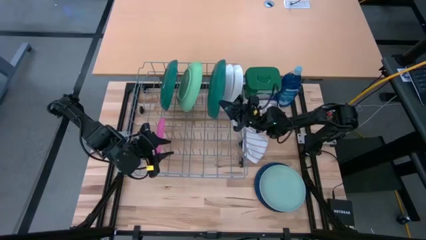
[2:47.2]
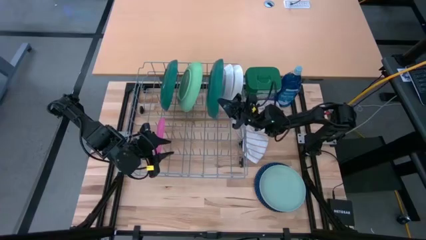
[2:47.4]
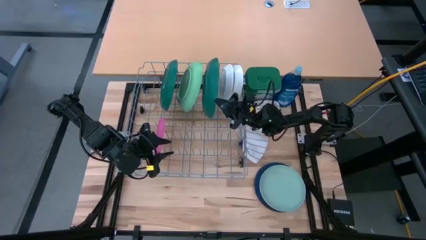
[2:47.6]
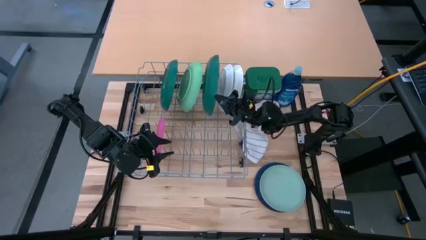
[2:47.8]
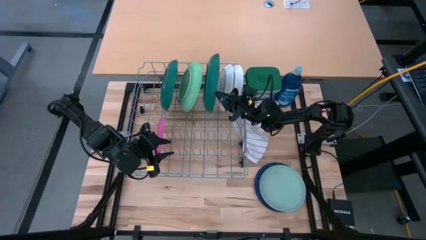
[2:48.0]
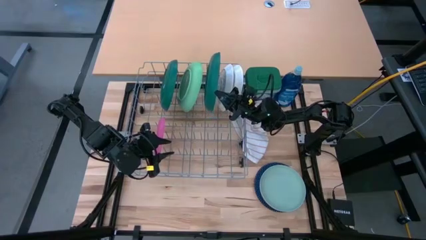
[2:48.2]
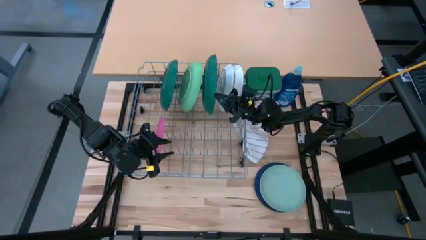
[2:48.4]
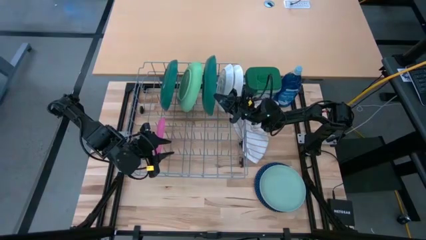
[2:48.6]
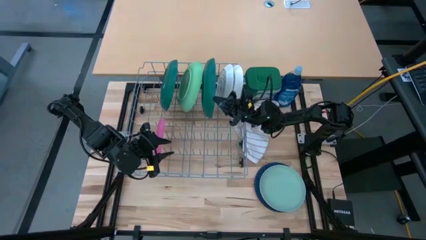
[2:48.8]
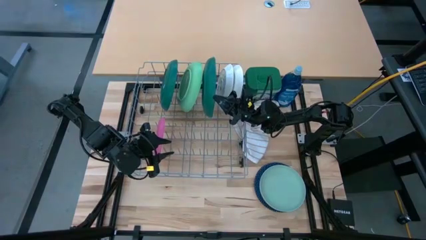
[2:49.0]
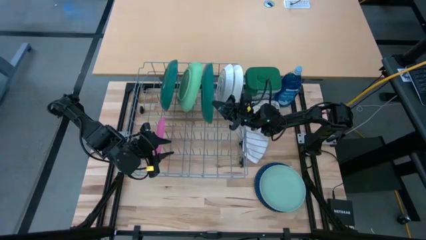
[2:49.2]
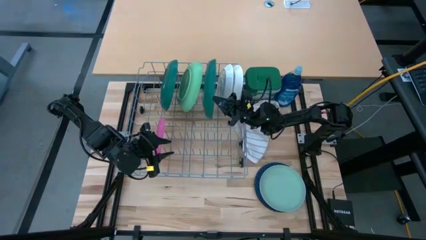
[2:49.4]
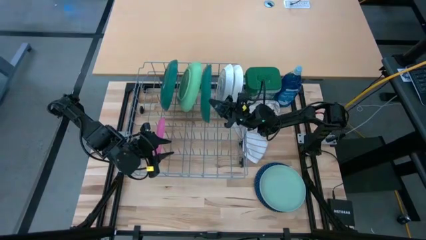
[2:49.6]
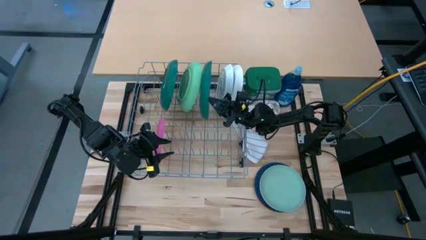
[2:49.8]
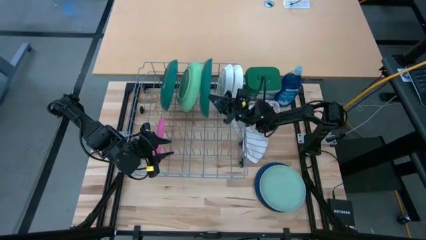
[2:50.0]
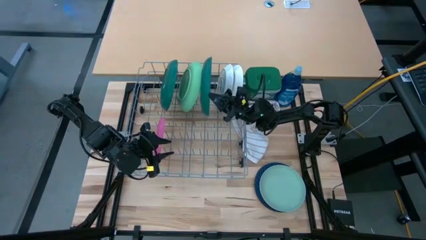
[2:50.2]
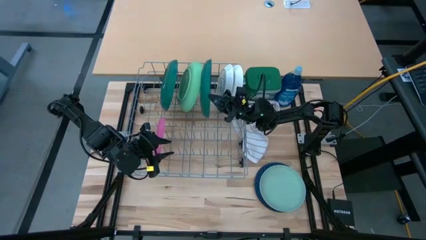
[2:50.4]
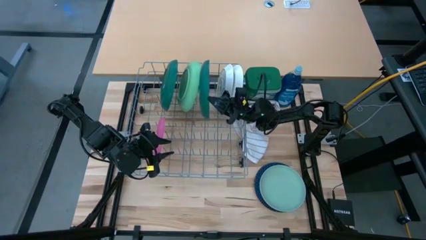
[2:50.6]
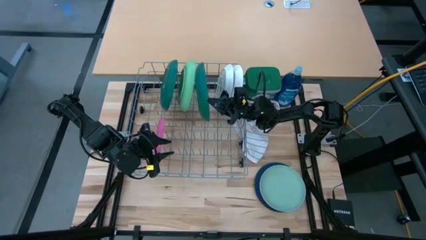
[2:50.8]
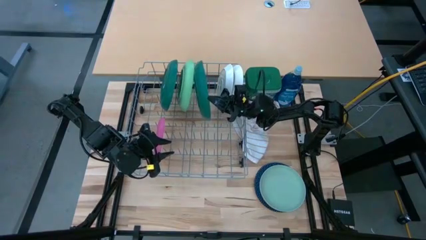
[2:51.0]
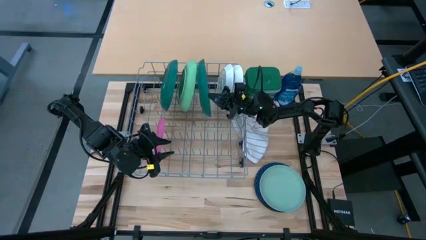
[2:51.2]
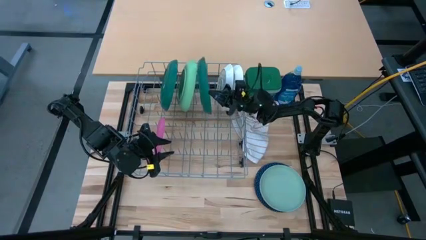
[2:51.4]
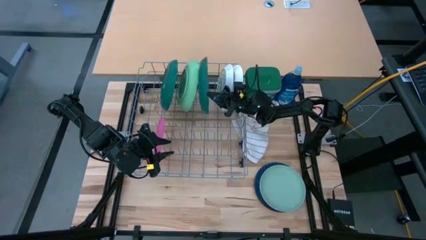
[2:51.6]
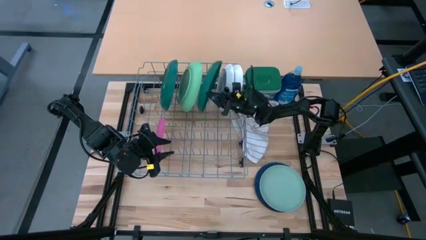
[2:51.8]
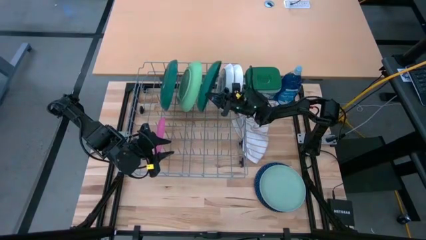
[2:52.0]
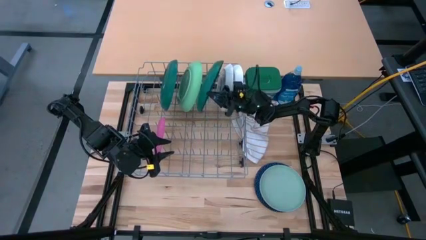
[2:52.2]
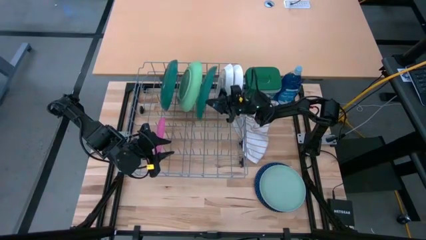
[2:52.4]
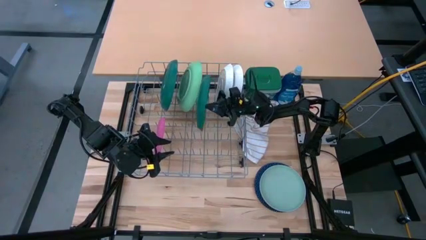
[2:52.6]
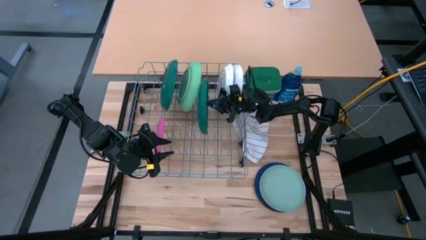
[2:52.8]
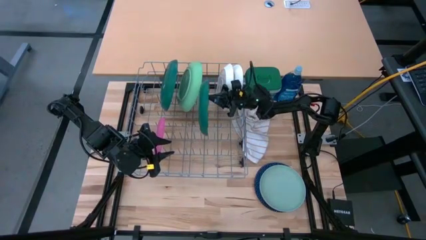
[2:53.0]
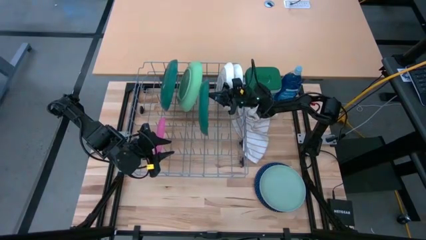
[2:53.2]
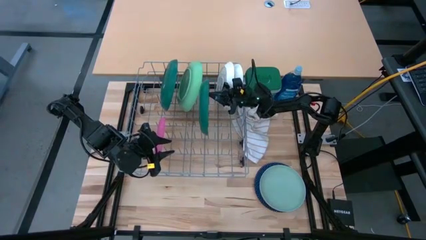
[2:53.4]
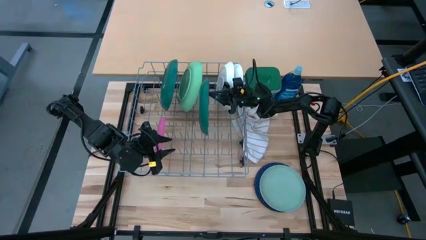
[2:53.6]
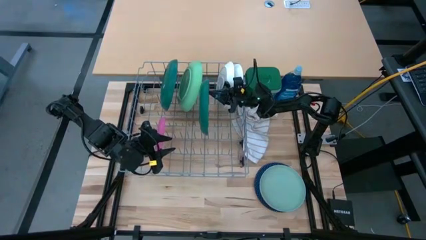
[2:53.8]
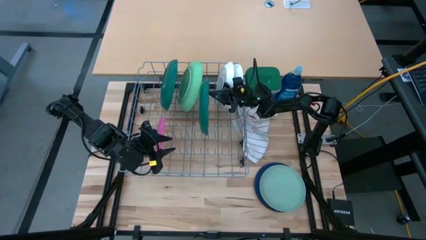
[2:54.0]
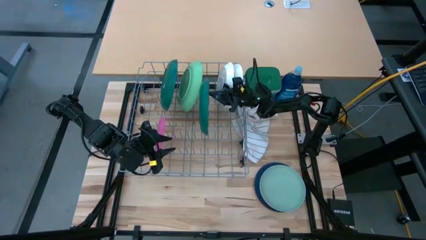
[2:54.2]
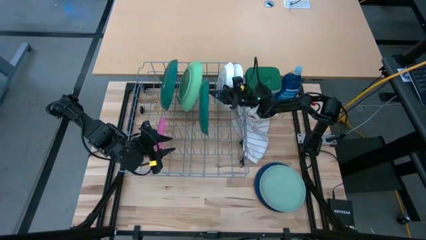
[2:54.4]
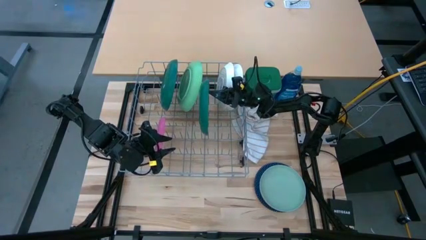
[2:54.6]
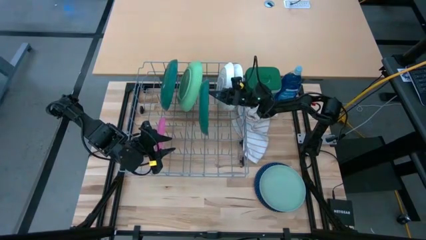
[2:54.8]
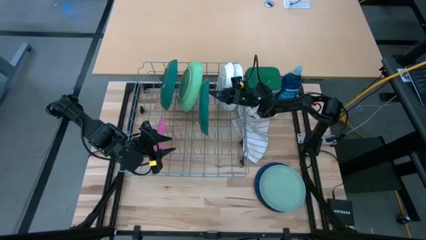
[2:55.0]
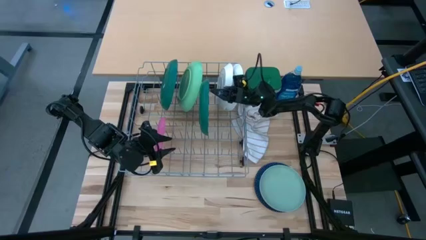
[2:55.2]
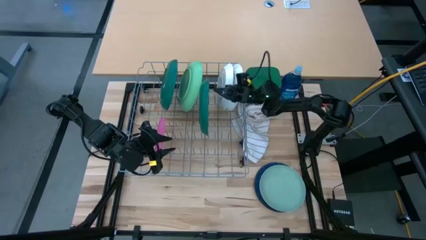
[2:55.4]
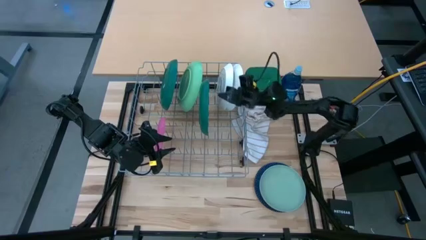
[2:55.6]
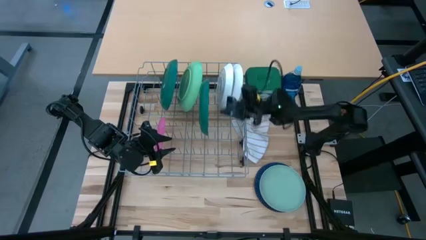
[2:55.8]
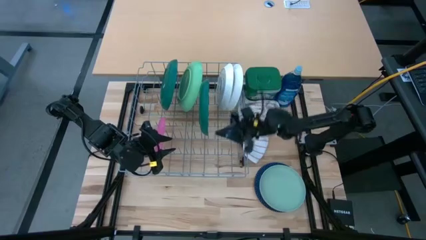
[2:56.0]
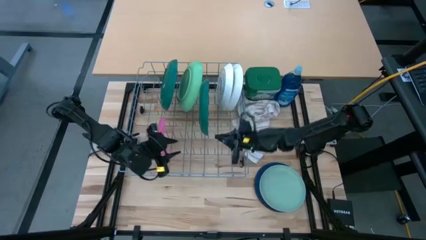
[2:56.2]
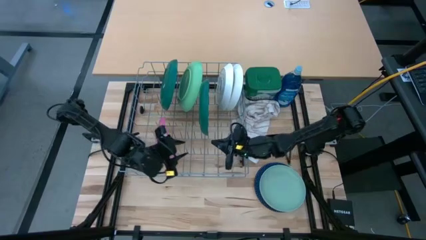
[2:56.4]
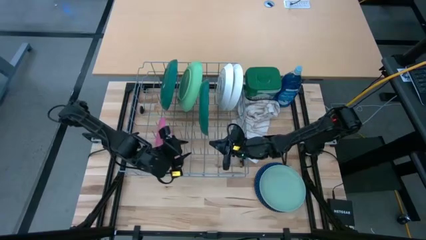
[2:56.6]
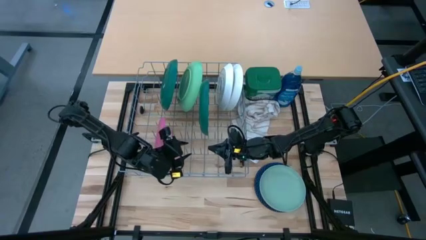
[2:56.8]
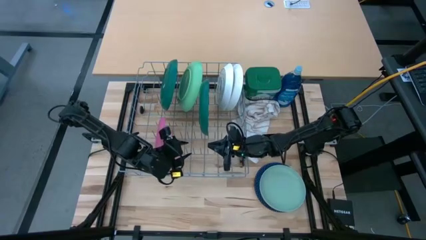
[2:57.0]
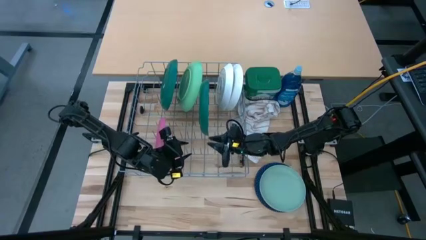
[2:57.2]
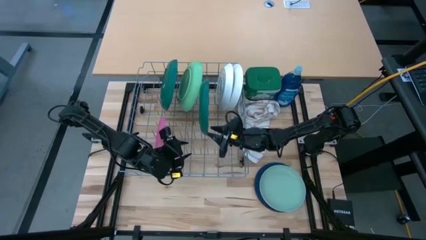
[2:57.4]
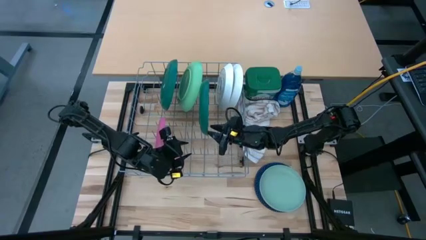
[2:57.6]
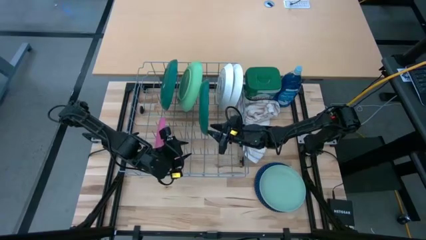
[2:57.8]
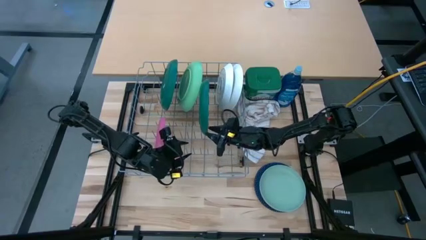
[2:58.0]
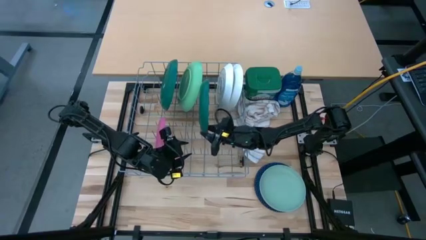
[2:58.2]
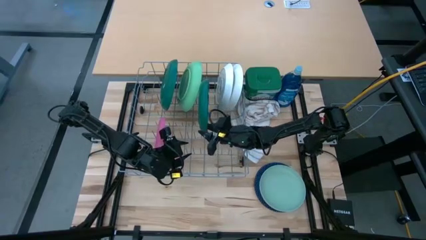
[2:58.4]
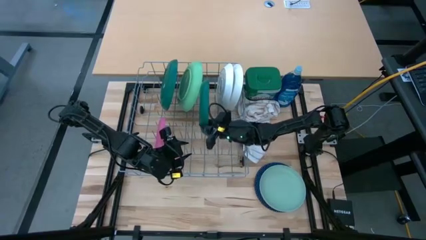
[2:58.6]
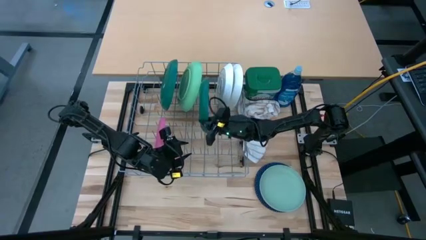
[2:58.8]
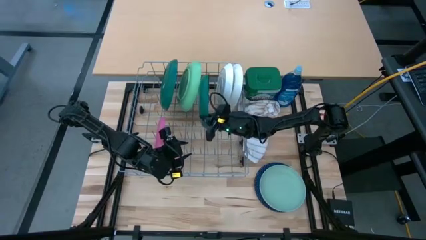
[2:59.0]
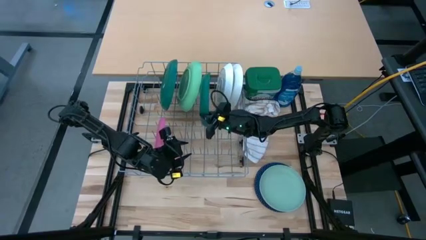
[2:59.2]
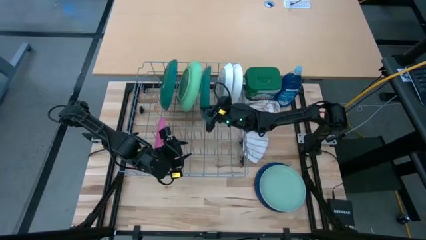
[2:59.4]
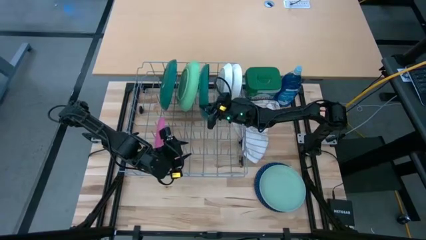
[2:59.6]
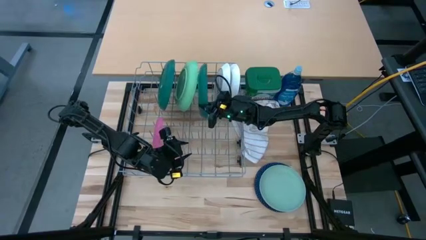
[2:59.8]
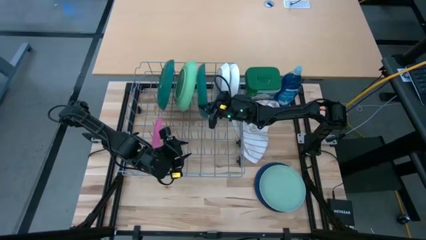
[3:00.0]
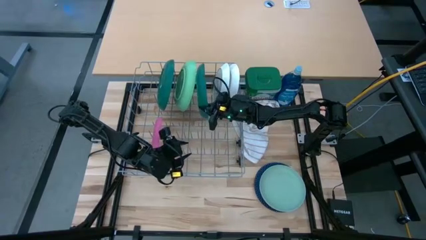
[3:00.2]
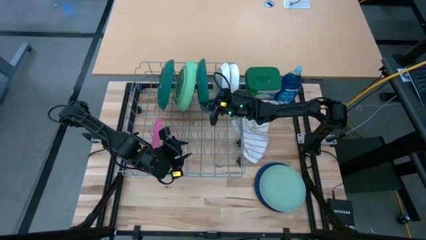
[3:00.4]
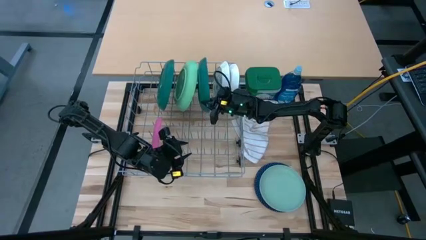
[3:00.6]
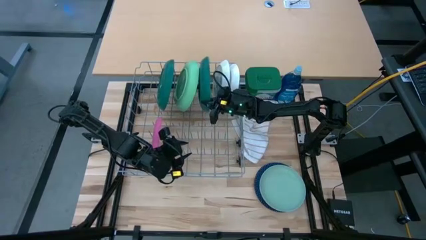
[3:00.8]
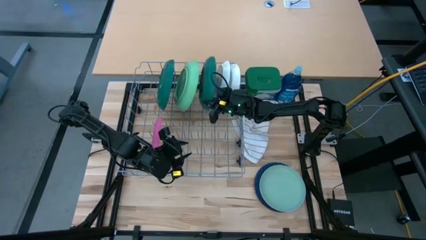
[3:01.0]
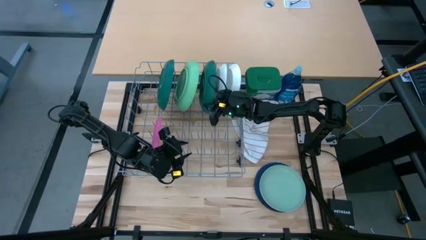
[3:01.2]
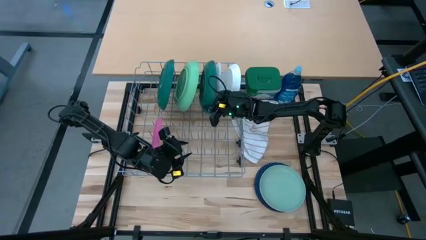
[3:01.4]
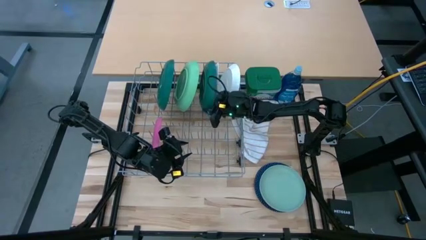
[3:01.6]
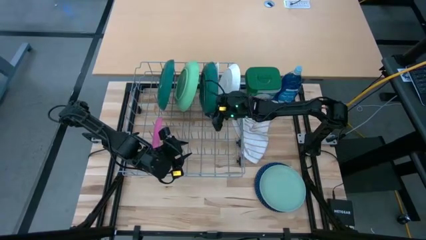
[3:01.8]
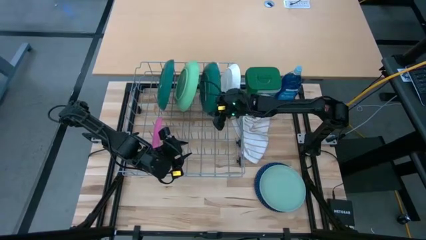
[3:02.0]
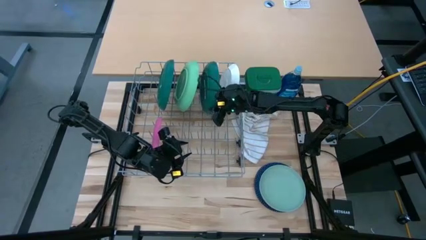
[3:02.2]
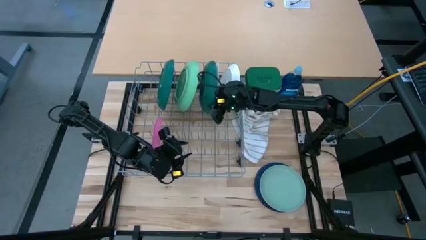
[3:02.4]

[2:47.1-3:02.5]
Task: Sort dishes
Put the green plate in the dish rack
